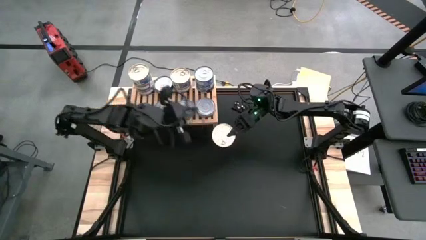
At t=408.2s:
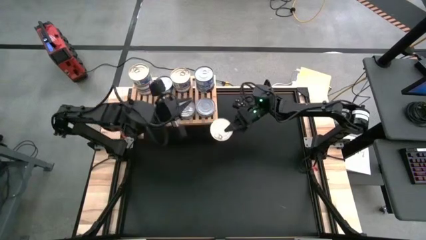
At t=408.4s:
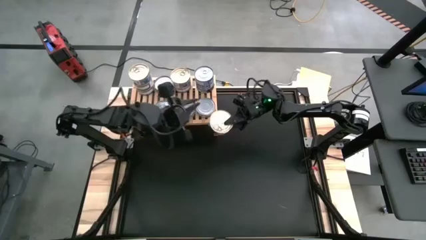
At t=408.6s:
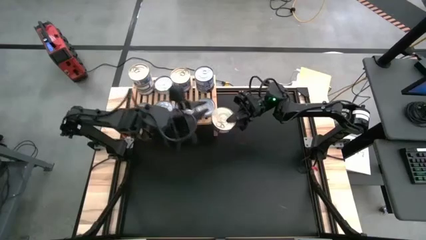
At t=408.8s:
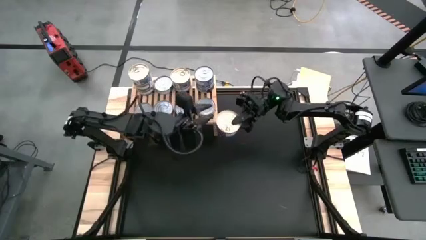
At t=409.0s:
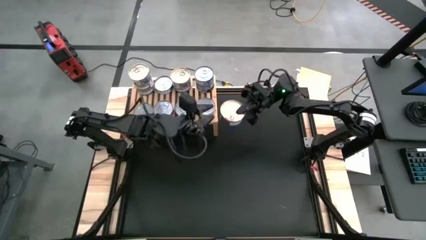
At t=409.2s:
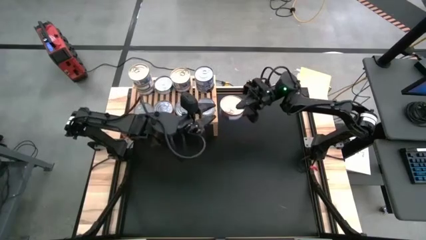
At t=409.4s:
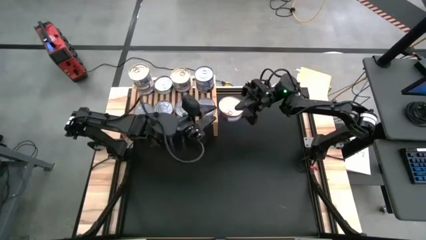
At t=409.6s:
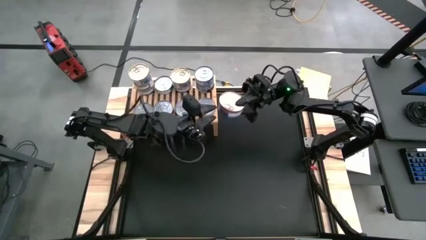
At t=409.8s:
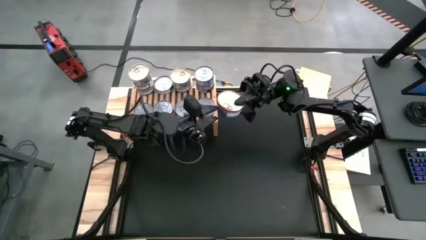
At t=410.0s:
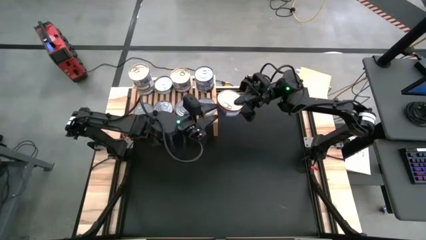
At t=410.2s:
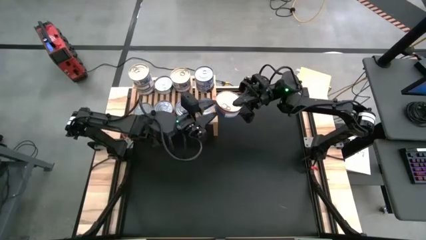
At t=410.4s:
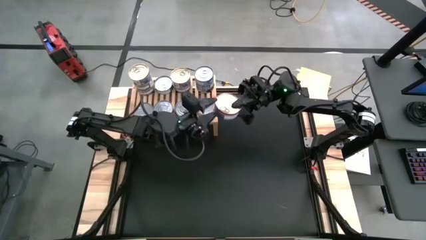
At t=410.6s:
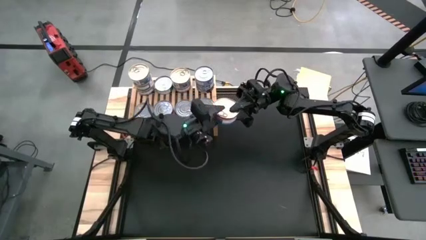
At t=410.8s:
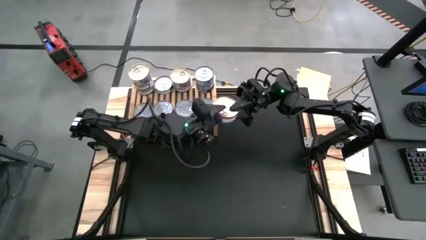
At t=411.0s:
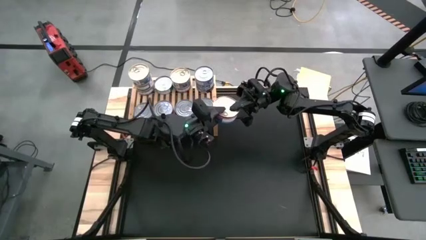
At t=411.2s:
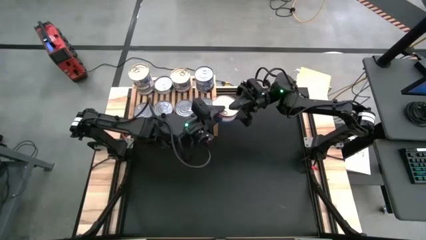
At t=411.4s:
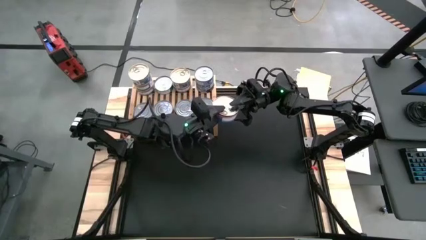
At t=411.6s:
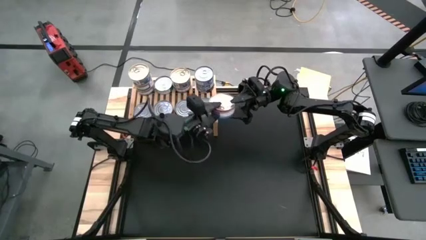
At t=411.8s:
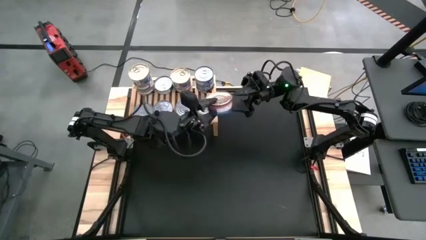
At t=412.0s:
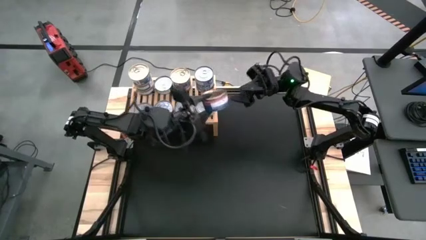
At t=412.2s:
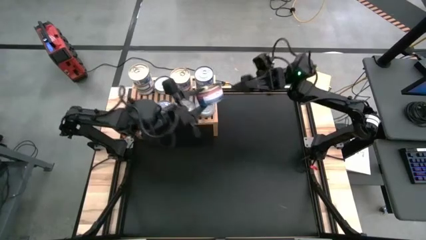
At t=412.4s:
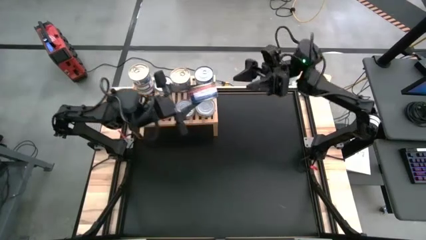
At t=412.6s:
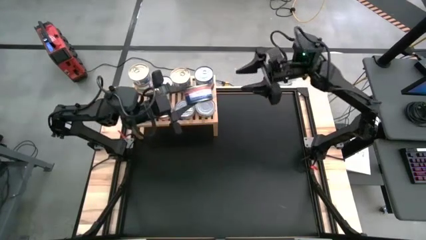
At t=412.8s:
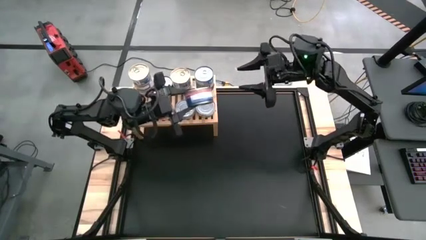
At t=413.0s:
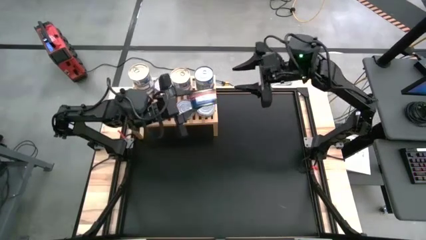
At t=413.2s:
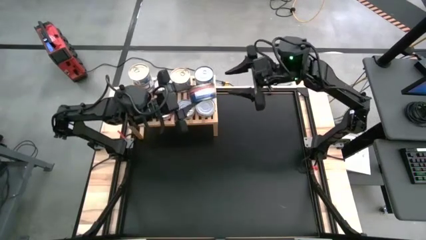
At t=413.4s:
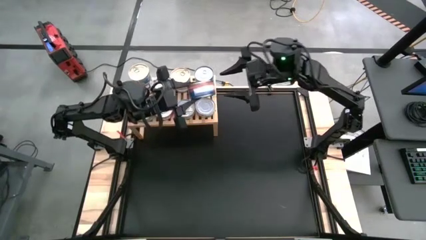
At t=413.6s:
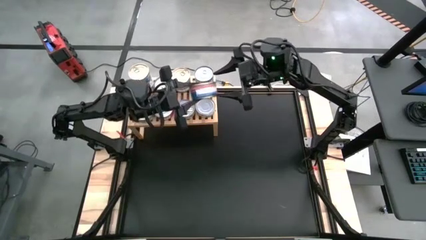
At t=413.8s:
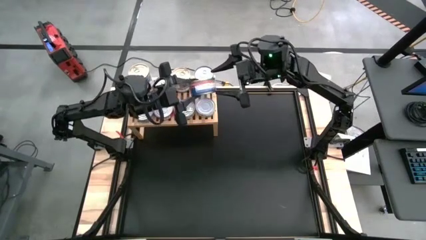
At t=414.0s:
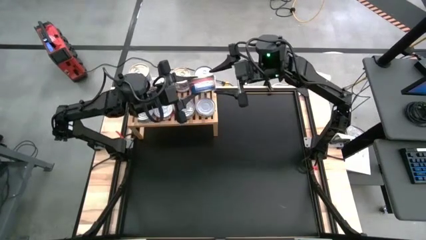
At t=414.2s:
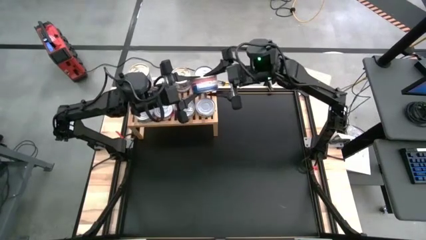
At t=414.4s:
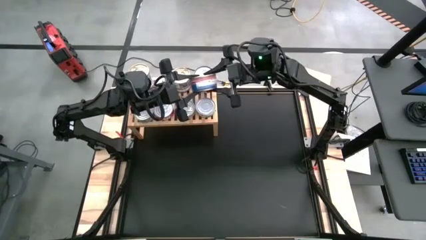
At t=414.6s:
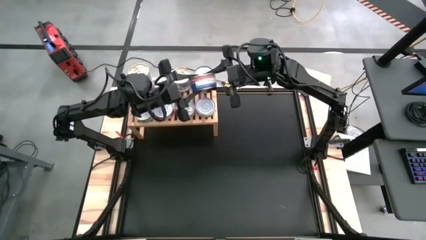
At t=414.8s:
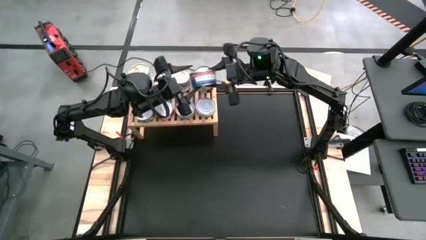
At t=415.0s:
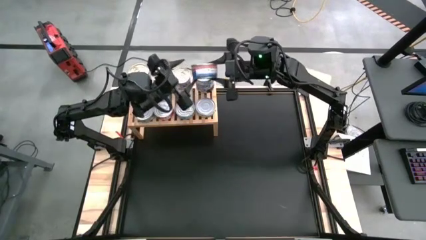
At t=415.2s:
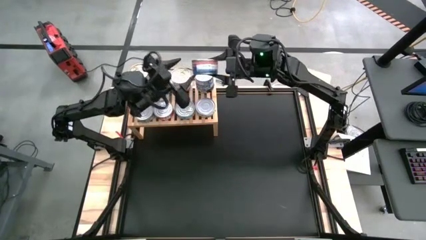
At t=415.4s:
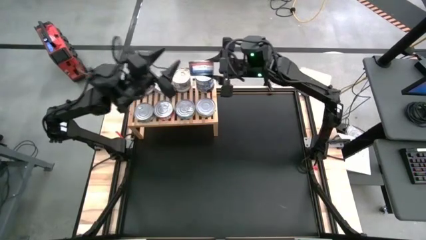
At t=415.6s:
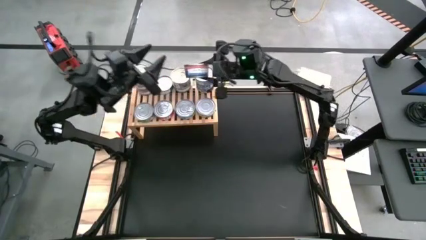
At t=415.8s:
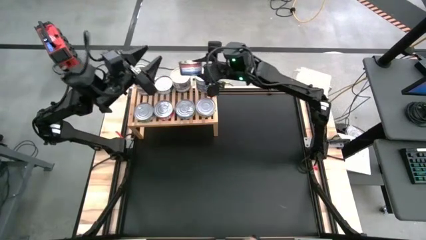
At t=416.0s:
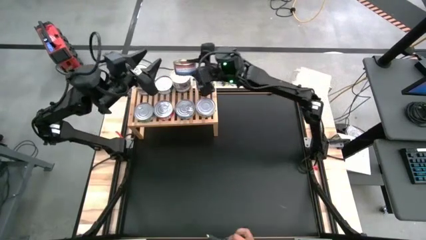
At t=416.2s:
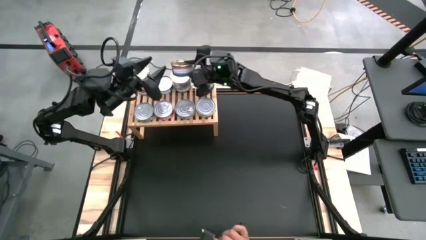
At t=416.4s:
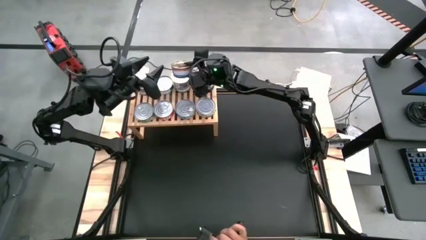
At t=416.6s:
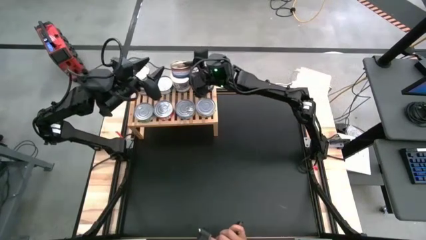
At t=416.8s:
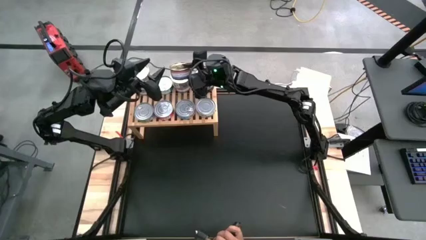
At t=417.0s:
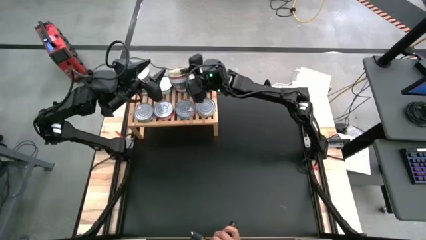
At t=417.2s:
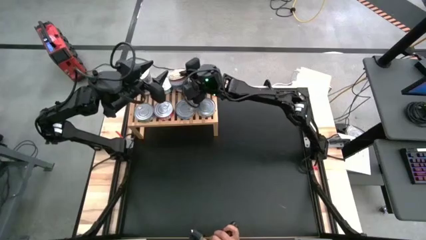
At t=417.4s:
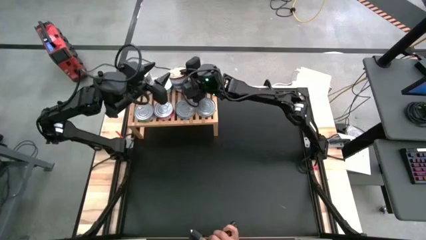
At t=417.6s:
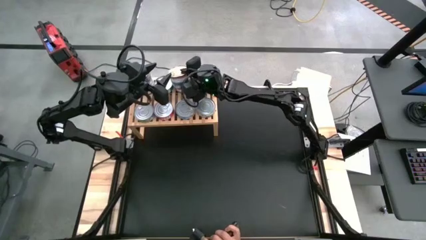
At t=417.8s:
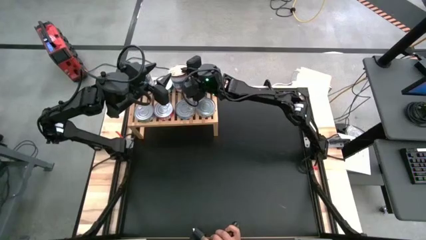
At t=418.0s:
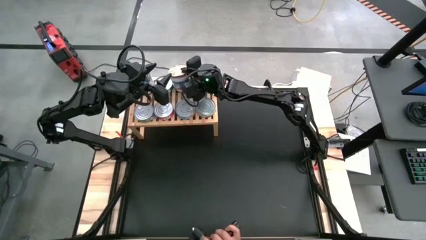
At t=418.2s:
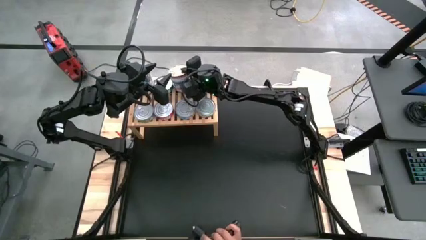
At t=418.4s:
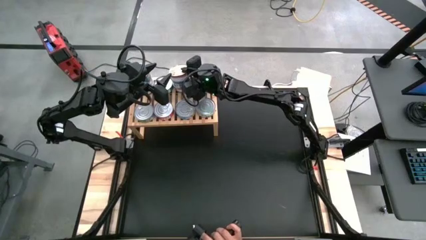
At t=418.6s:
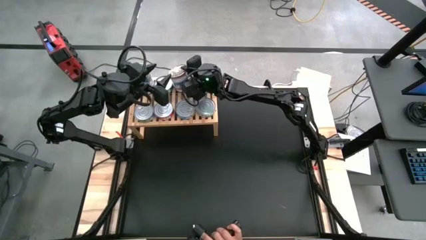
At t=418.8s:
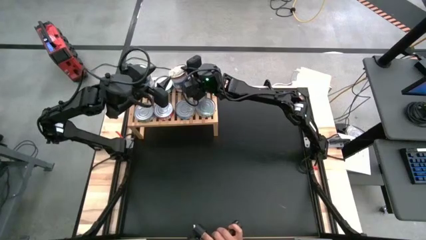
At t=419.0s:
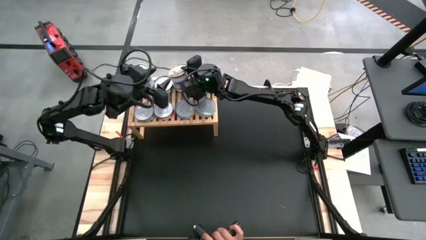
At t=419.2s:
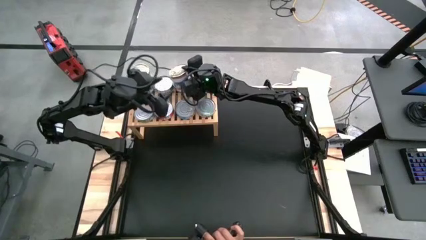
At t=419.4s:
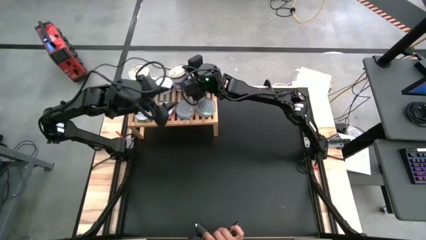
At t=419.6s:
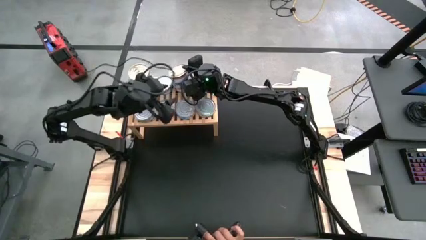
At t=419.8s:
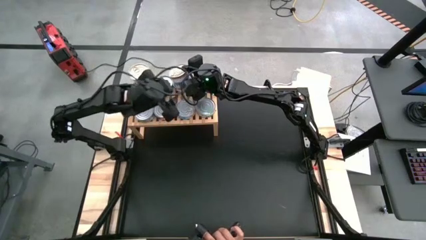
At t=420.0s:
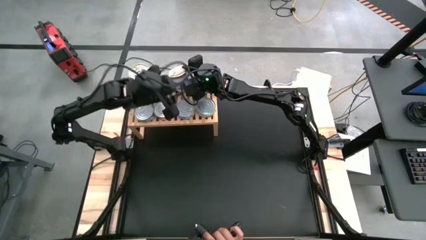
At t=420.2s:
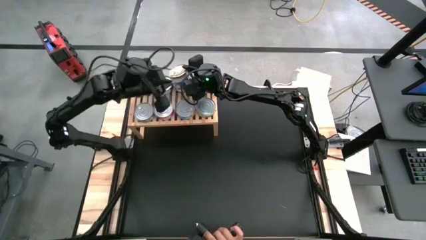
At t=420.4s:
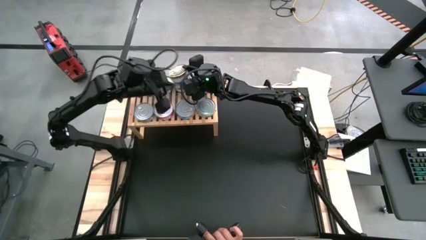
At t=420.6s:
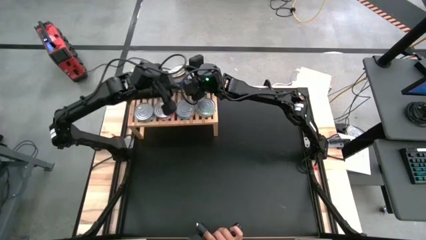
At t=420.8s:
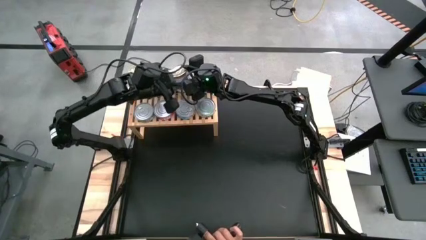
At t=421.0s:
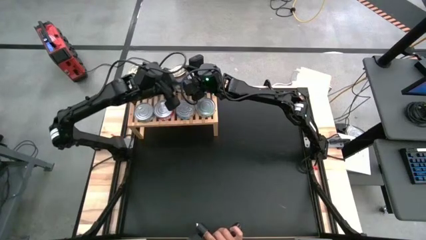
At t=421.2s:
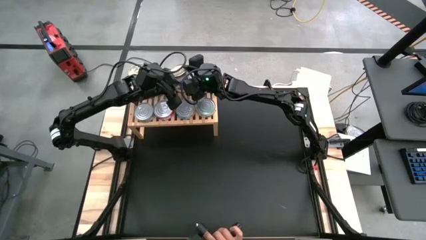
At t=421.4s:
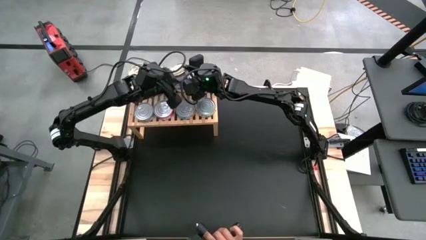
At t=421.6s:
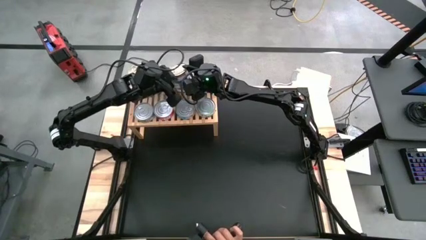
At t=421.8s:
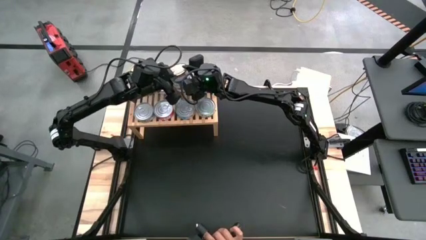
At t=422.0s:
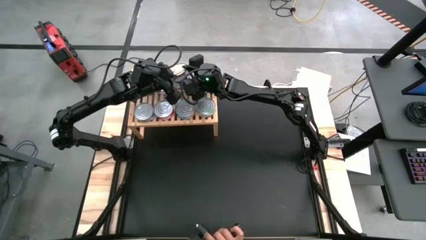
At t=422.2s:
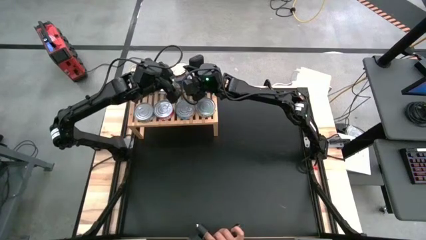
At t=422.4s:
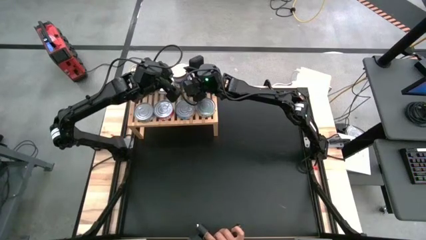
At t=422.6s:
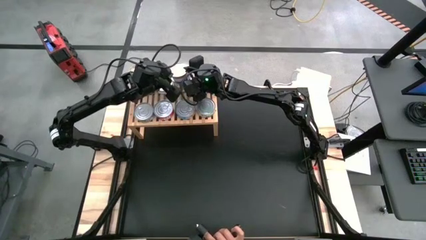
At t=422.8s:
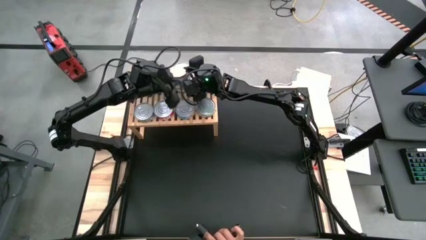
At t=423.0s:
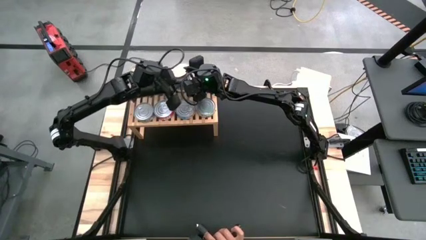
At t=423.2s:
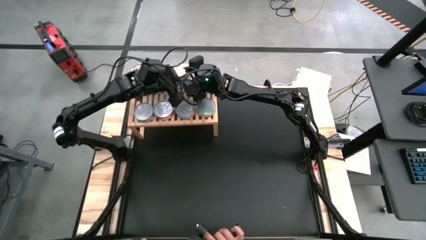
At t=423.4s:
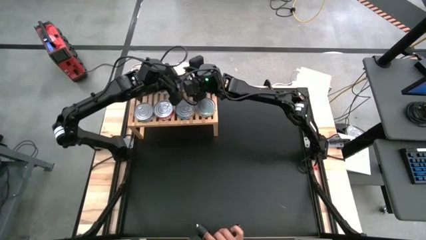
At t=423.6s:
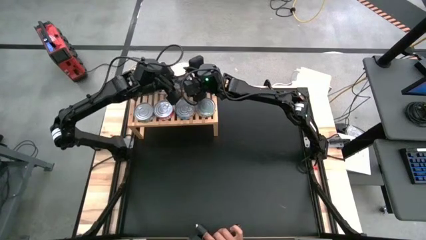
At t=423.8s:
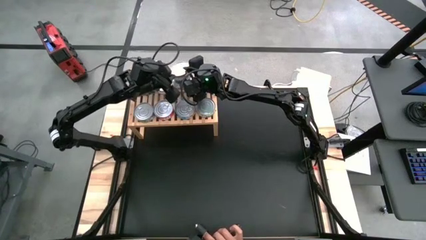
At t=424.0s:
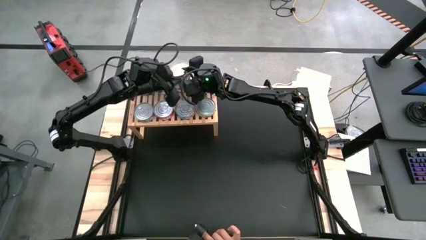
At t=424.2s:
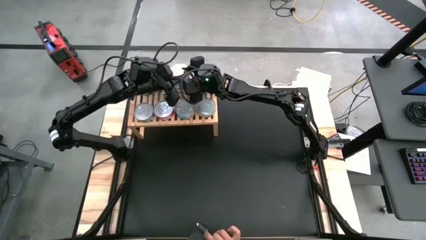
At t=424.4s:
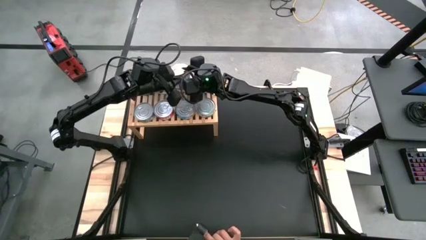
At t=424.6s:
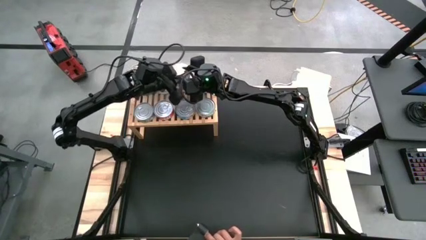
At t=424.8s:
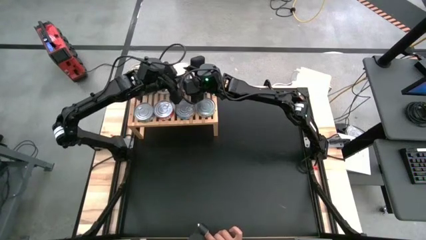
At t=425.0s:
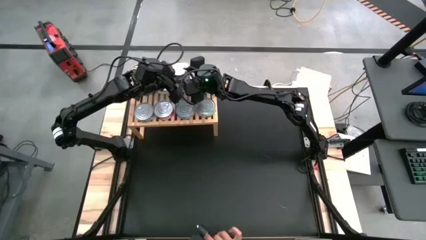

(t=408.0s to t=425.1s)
Task: Stack canned seafood by type on shelf
Stack the blue pink tuna can on top of the other blue pink tuna can on the shelf
